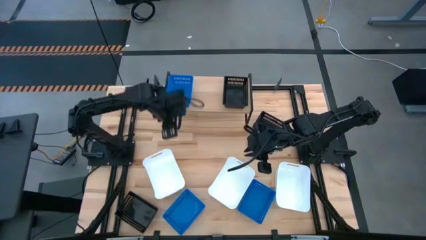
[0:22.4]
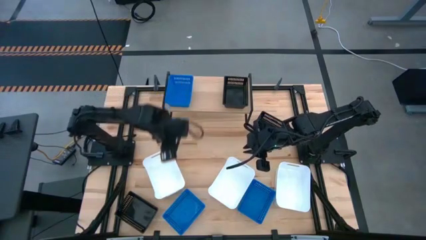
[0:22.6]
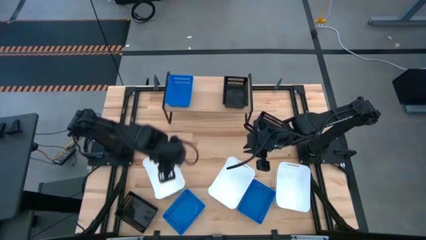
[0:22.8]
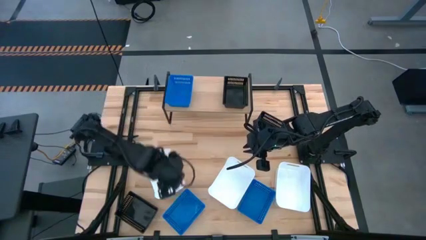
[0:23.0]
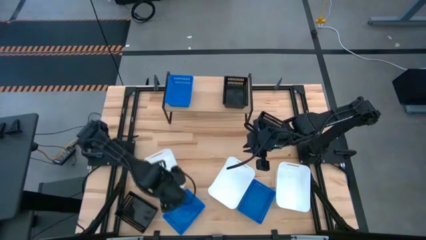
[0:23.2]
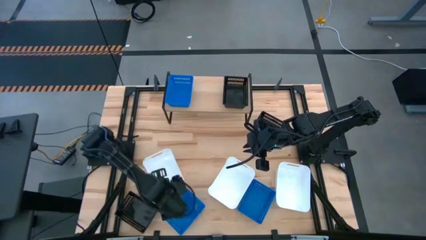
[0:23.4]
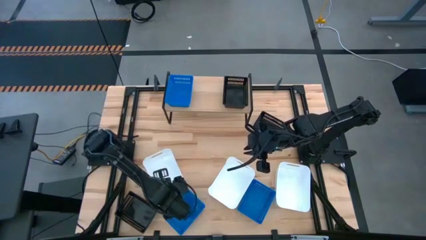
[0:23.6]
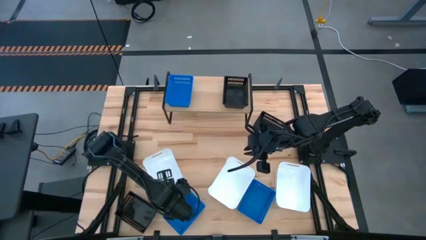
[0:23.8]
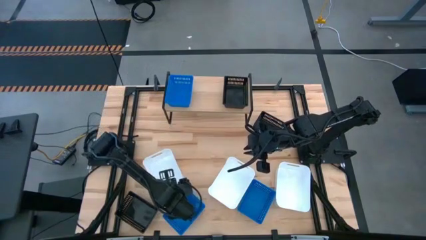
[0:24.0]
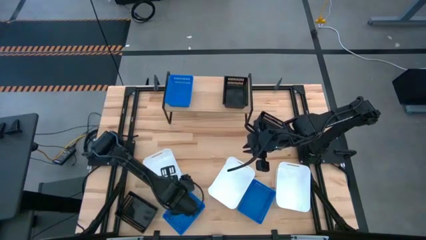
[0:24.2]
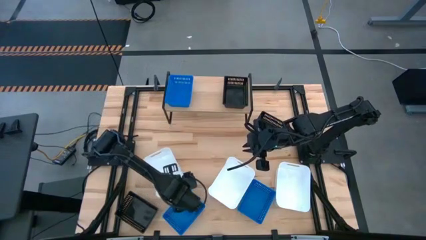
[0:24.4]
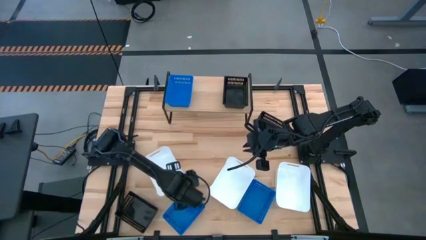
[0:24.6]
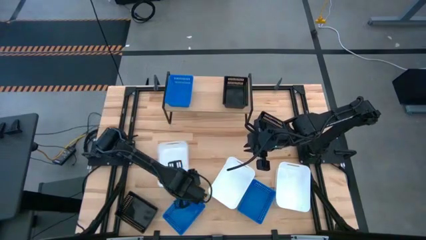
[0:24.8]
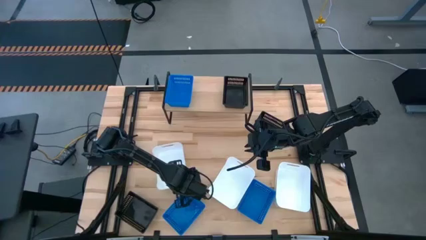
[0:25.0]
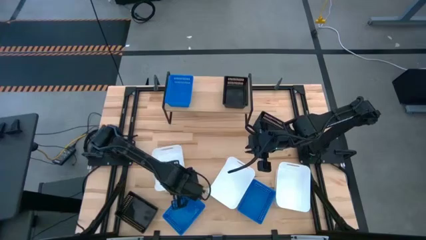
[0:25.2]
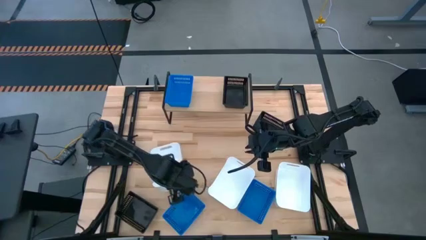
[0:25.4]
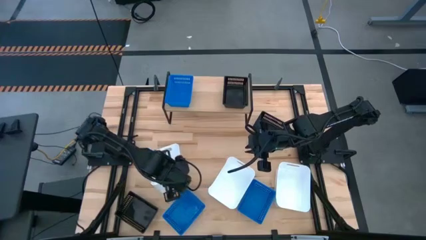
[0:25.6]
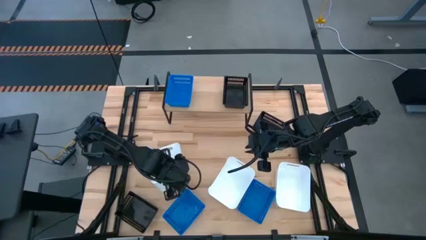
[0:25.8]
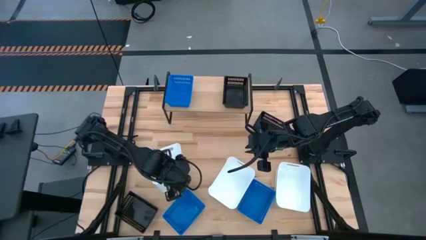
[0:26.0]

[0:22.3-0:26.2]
Task: Stack baskets on shelf by color
Put the center left white bin on the shelf

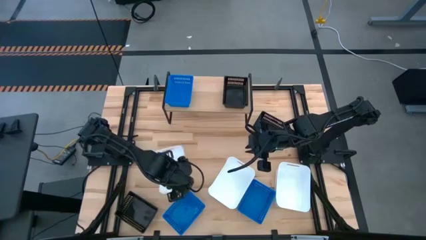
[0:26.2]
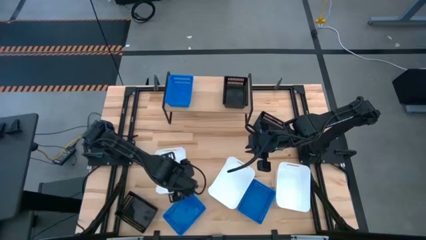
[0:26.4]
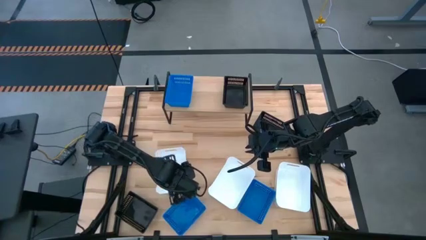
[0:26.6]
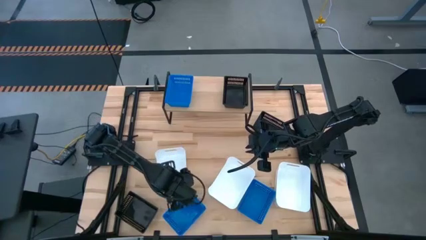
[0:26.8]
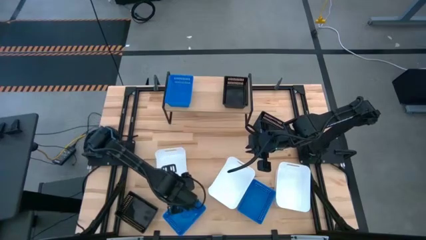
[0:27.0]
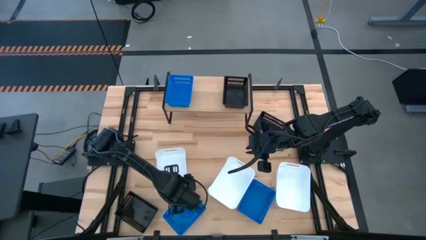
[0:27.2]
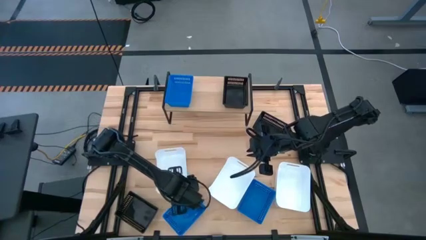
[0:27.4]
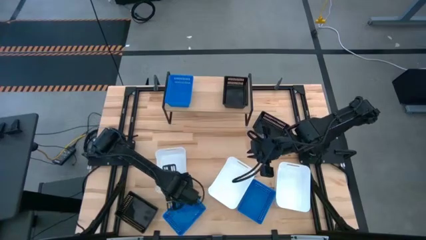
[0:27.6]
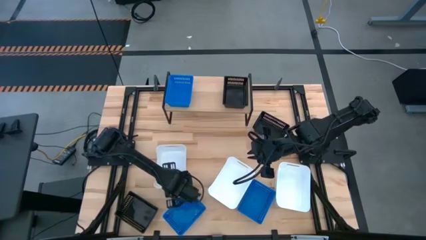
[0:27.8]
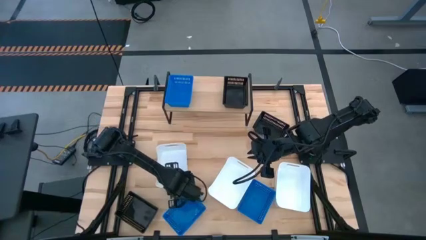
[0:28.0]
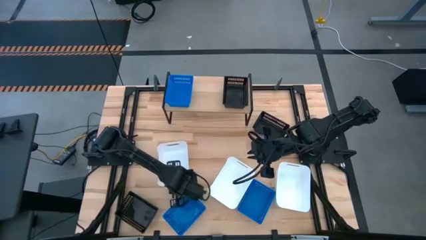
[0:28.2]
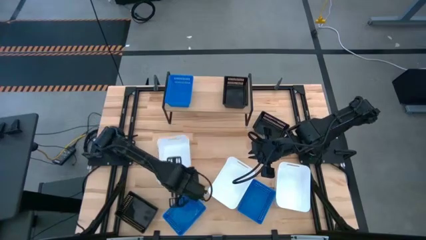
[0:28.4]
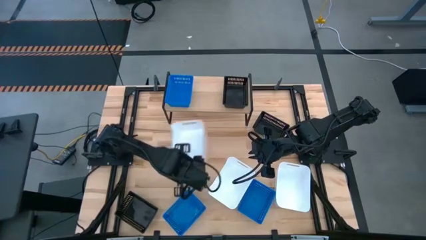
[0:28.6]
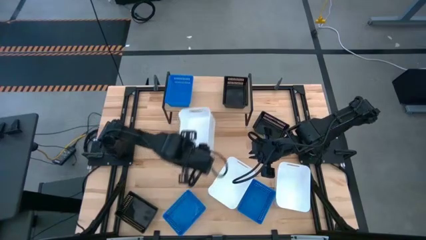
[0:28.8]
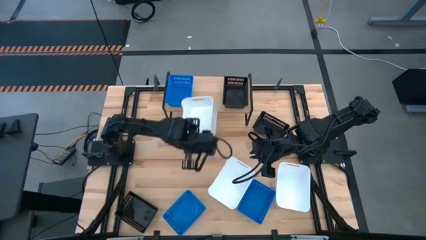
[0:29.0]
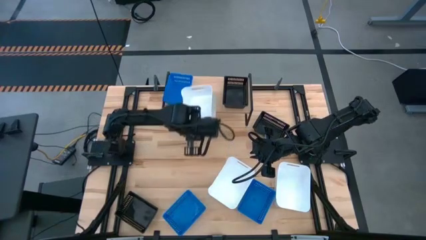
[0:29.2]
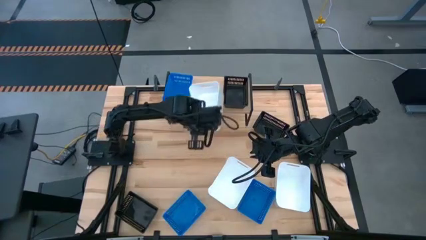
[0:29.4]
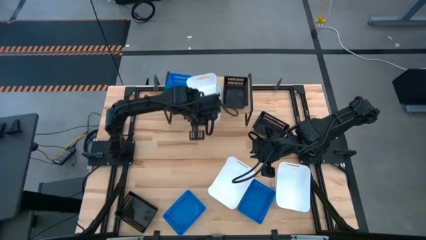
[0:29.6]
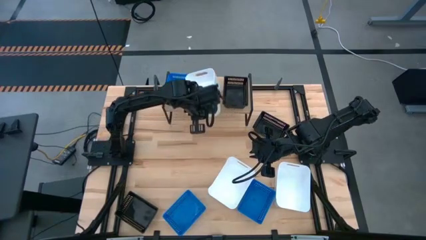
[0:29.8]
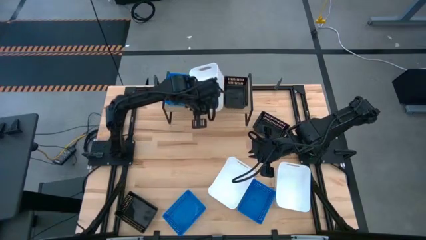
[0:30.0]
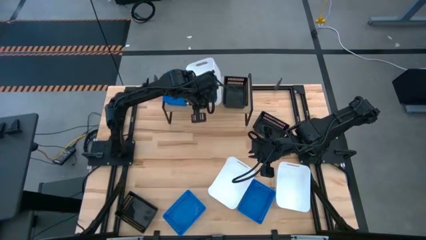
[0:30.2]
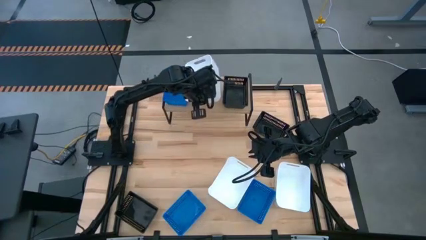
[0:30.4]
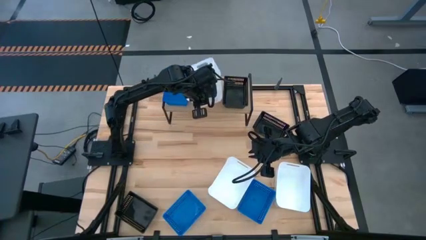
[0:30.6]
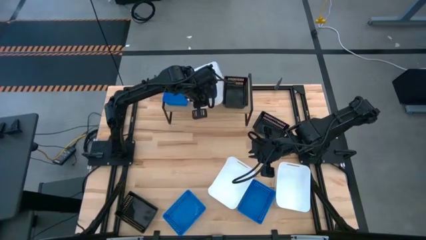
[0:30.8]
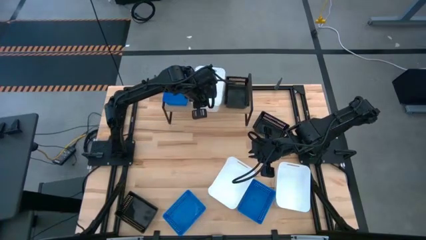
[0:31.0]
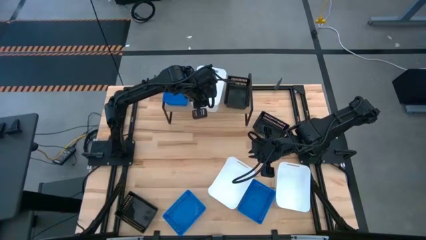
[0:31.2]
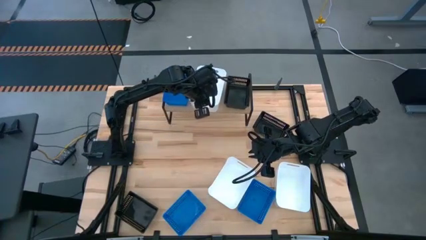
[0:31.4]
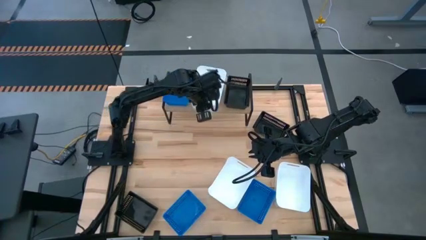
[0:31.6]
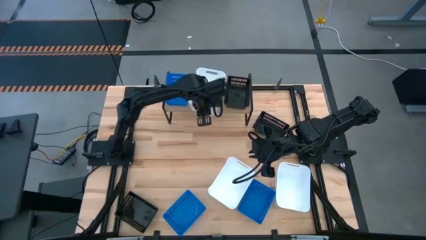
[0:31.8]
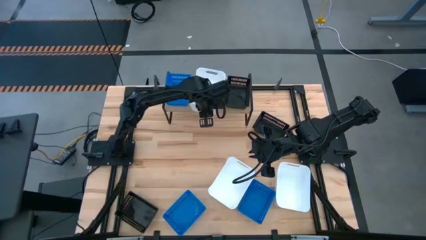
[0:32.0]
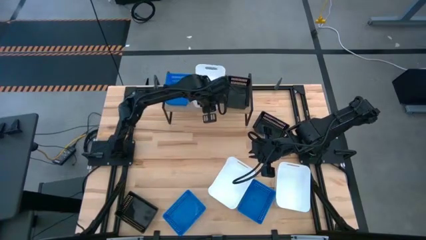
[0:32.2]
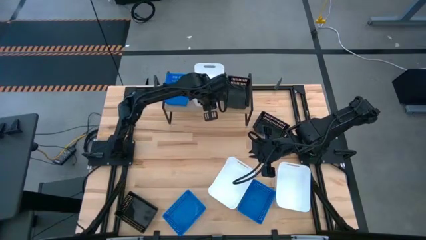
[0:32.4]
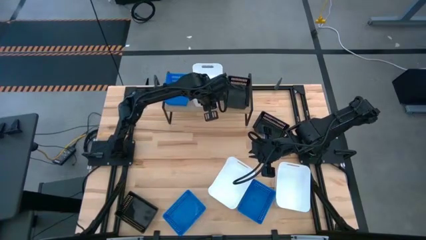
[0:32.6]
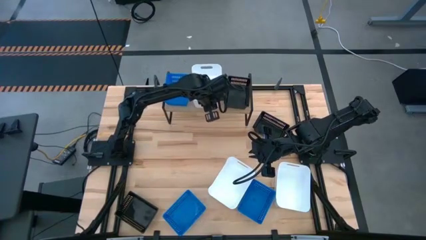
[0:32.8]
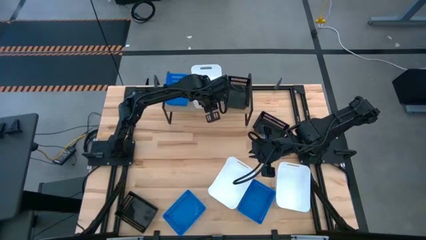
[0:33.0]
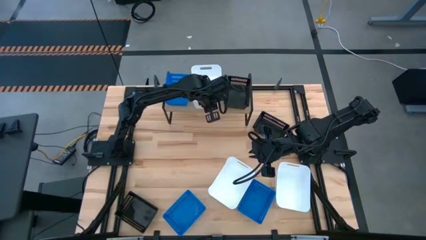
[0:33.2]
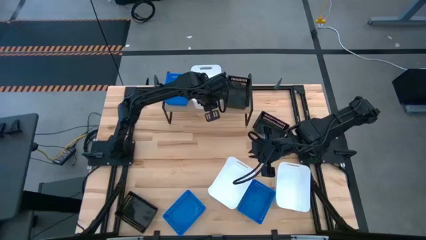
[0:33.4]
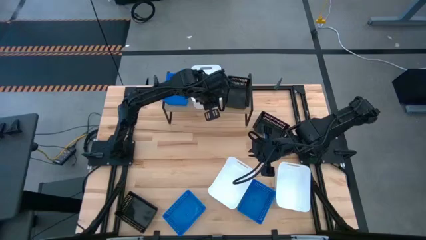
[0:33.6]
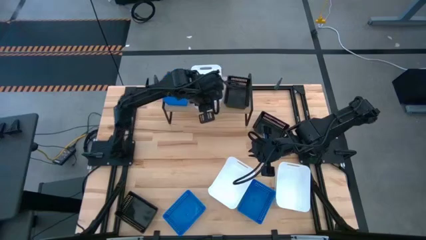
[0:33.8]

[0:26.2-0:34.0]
Put the center left white bin on the shelf

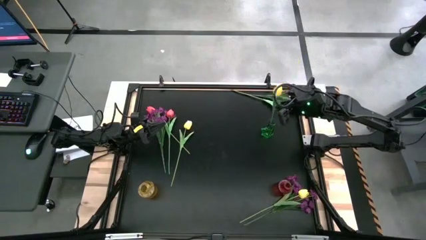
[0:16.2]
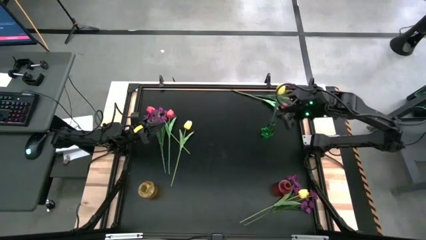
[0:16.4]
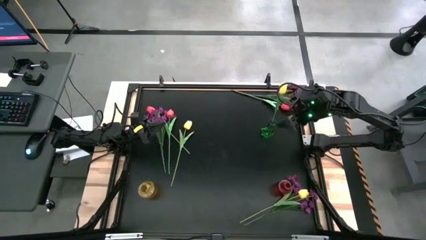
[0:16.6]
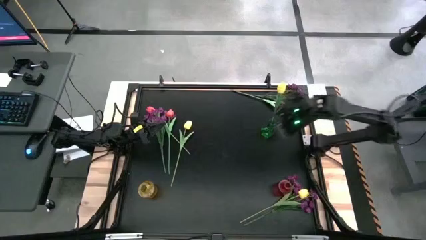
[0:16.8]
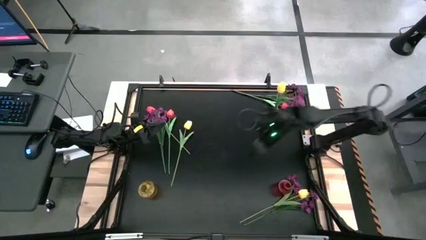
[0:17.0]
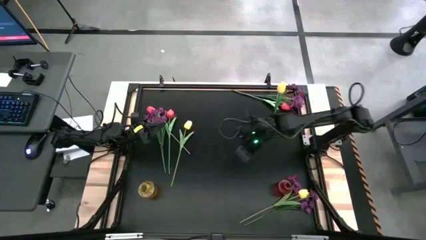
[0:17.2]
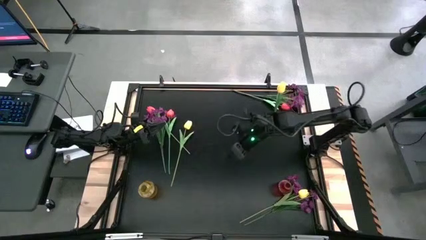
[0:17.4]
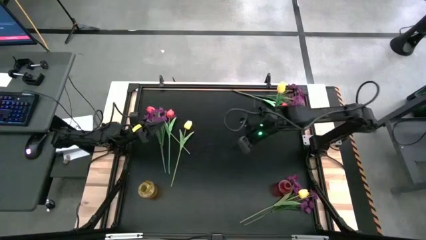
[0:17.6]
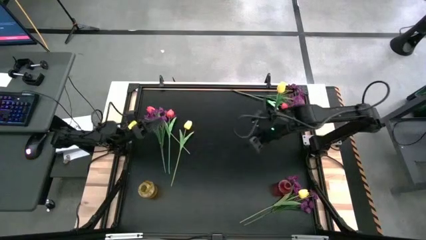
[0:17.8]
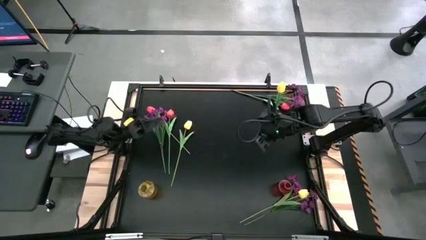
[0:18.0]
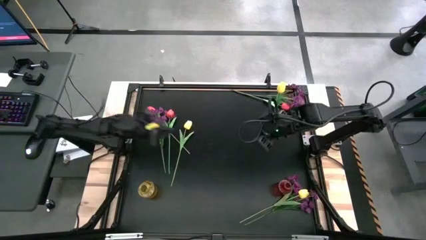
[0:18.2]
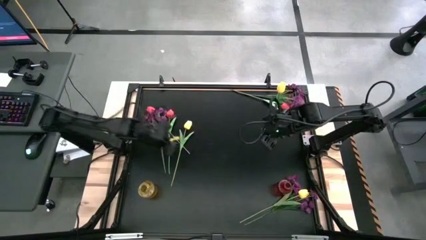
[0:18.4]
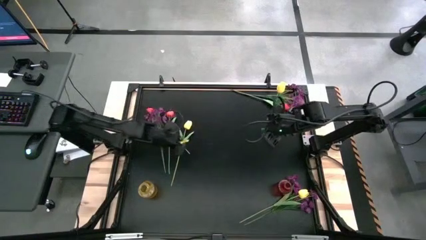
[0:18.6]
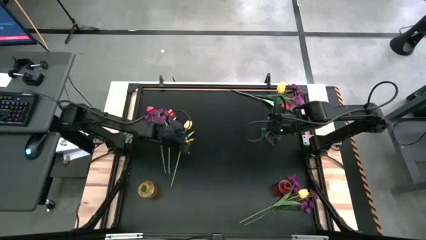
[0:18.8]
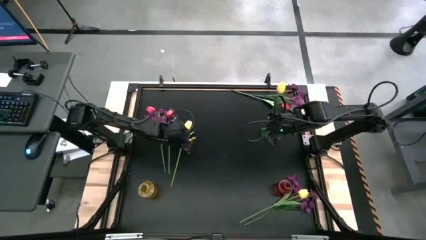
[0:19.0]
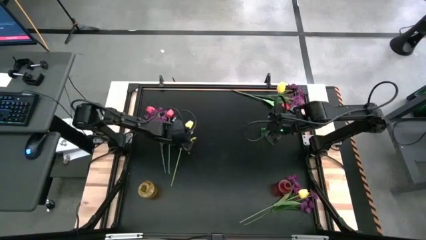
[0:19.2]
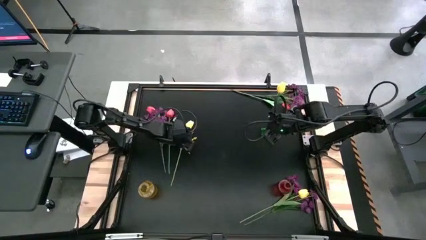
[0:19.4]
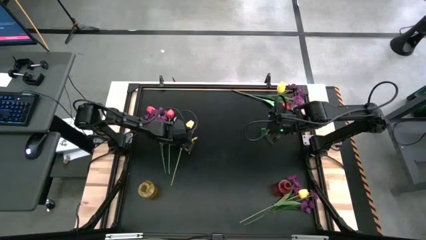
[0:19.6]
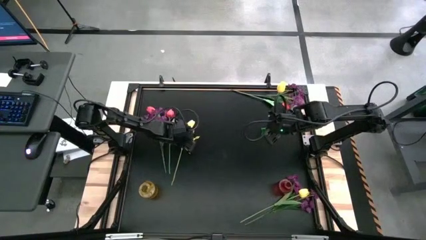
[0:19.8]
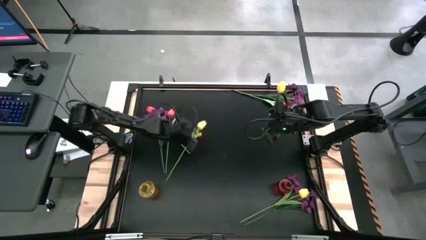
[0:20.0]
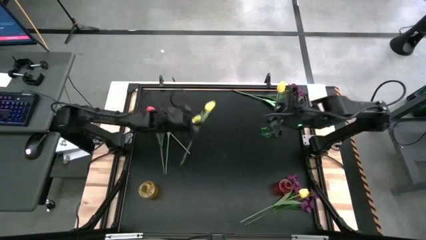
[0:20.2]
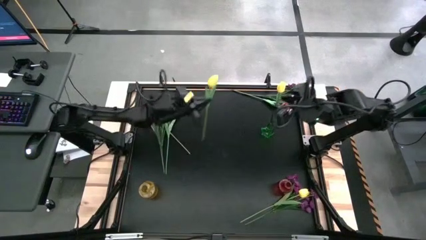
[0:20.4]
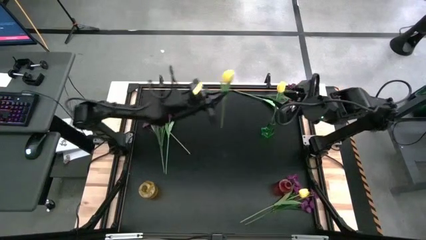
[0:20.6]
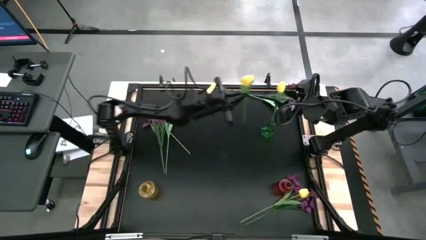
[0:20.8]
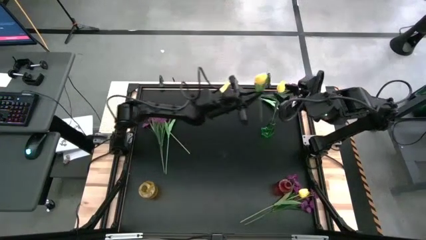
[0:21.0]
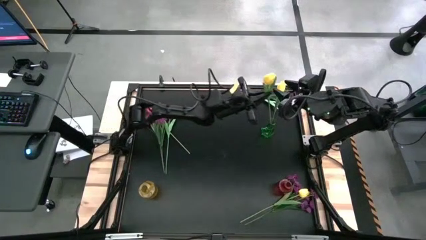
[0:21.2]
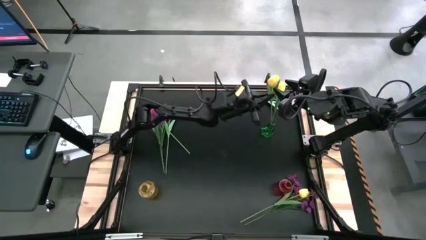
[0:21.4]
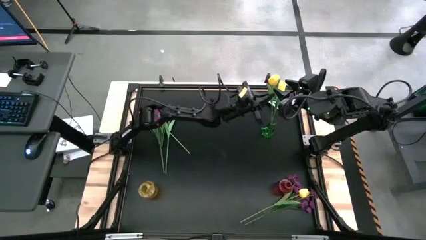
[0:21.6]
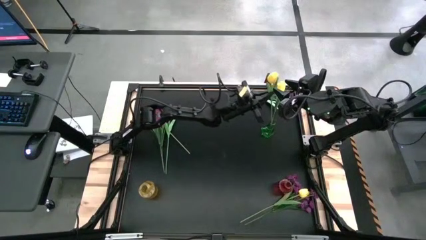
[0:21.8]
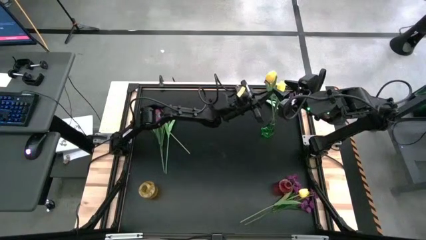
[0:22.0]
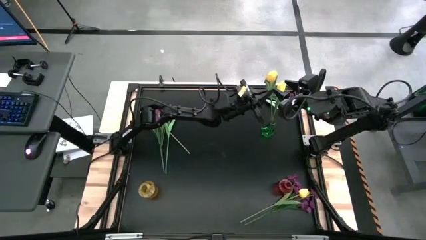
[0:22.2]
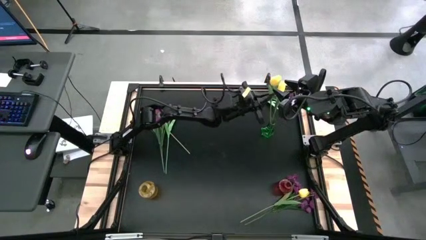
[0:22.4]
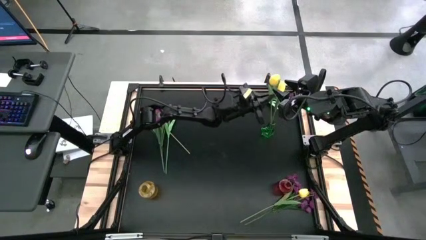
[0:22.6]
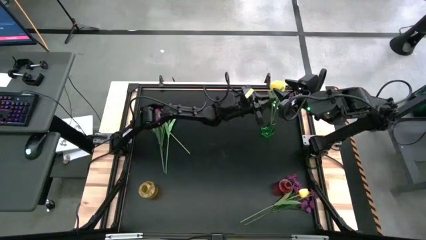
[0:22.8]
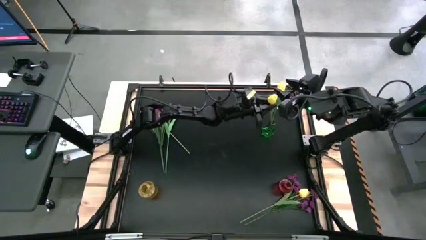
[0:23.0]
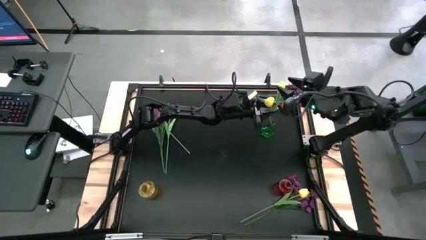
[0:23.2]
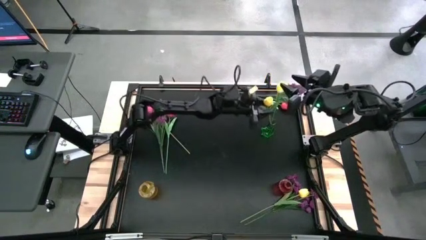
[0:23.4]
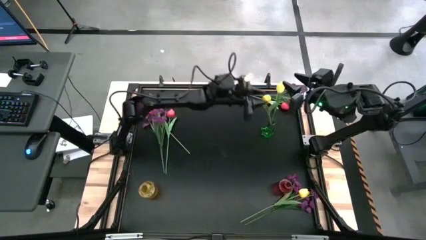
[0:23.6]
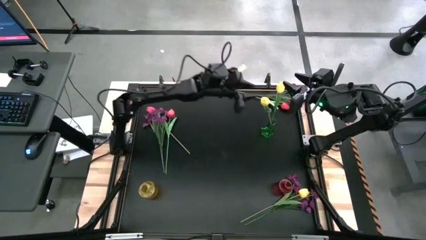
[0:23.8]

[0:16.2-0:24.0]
Task: Sort flowers into vase by color
Put the top yellow tulip into the green flower vase
